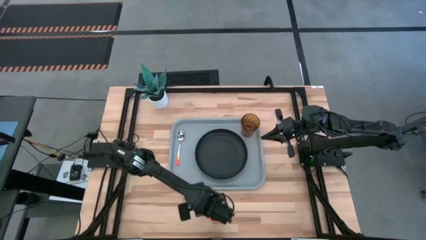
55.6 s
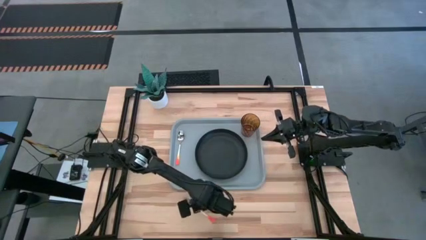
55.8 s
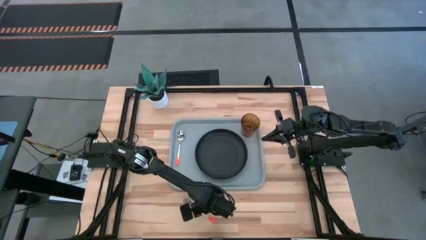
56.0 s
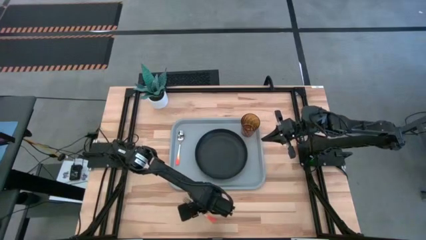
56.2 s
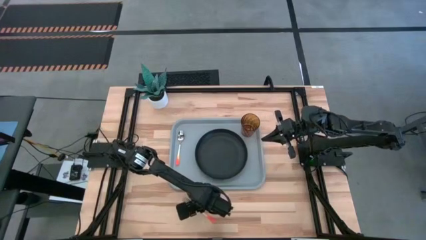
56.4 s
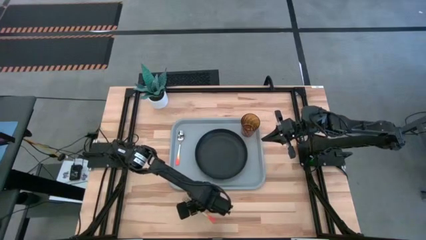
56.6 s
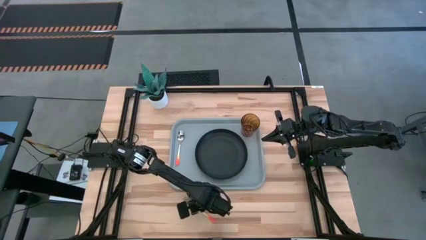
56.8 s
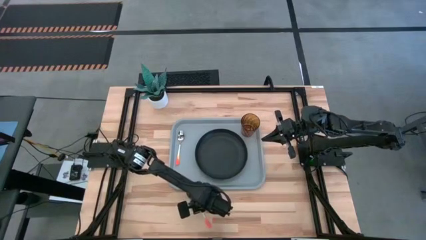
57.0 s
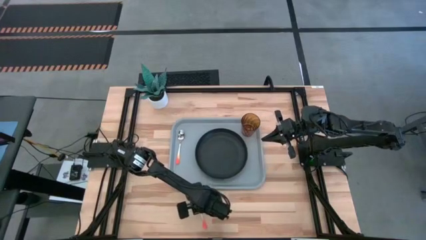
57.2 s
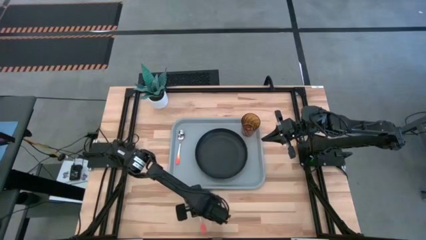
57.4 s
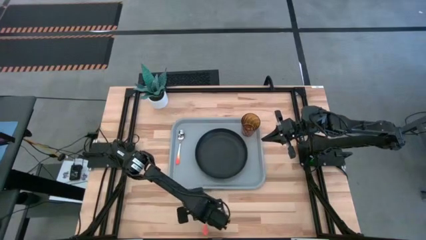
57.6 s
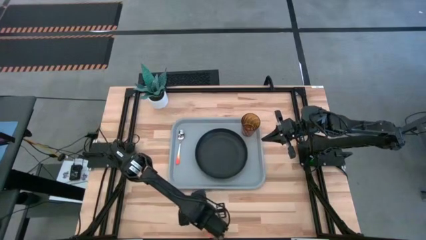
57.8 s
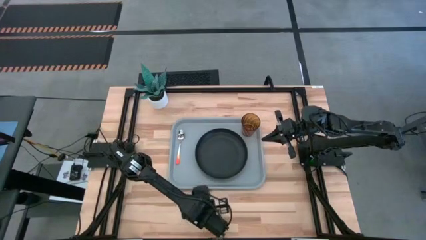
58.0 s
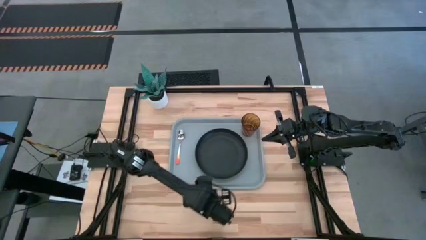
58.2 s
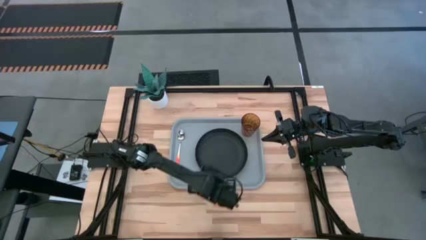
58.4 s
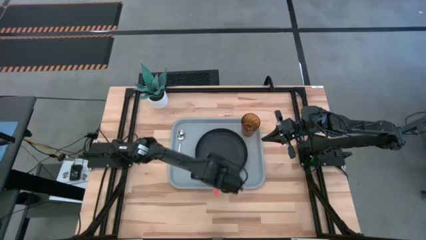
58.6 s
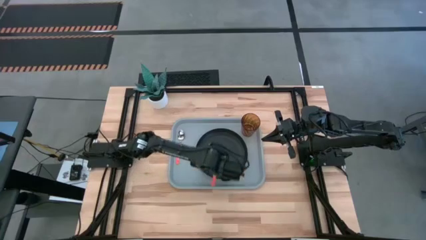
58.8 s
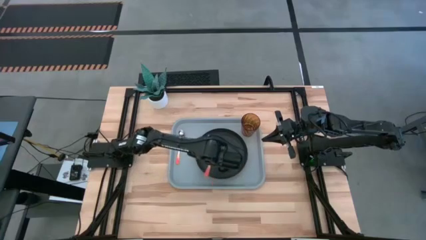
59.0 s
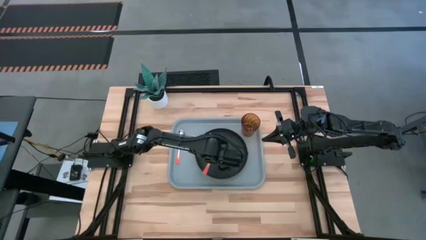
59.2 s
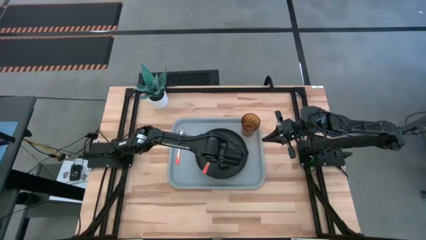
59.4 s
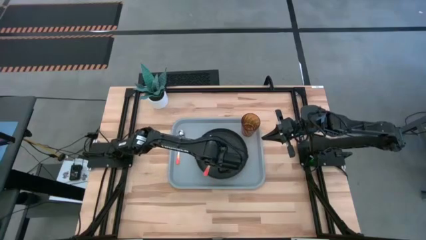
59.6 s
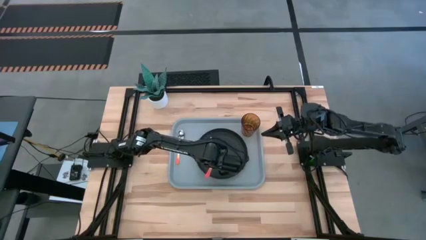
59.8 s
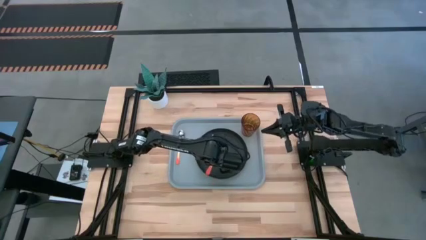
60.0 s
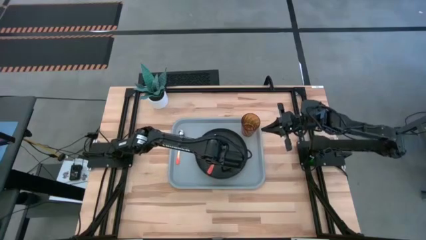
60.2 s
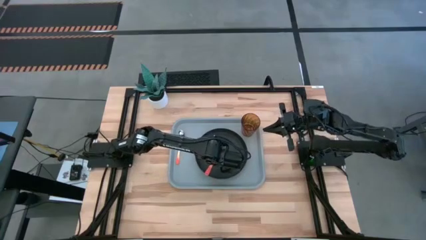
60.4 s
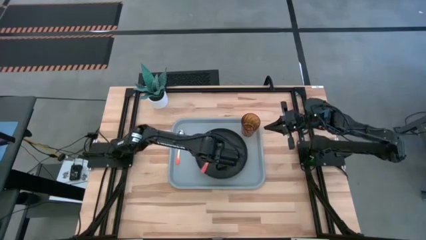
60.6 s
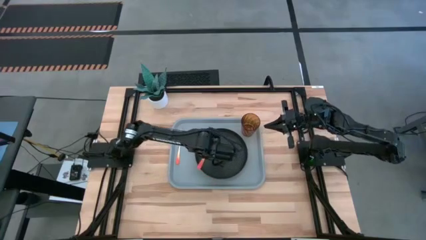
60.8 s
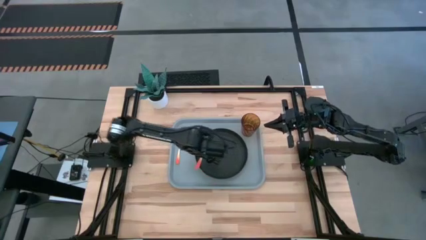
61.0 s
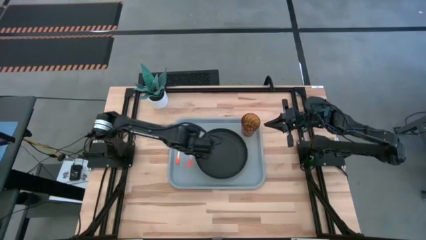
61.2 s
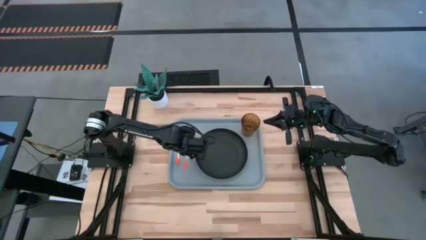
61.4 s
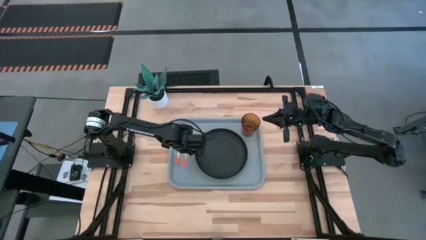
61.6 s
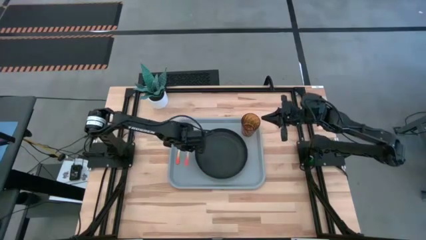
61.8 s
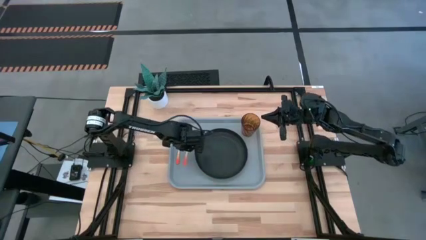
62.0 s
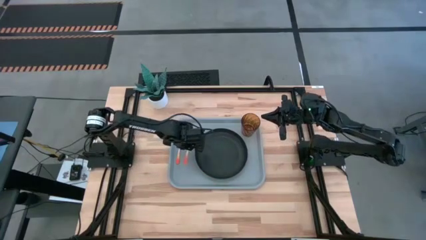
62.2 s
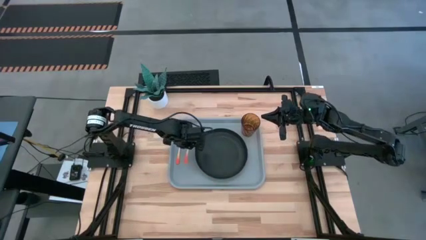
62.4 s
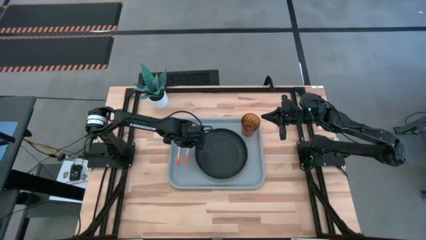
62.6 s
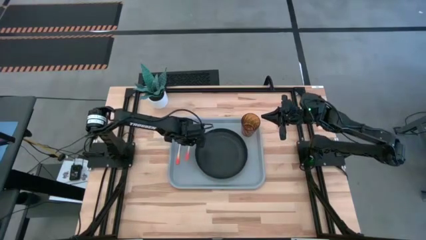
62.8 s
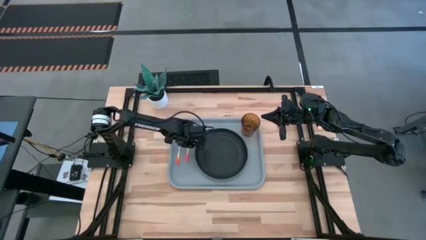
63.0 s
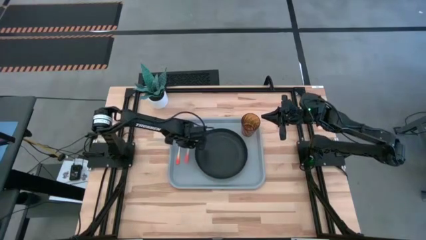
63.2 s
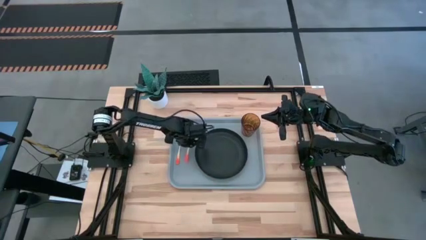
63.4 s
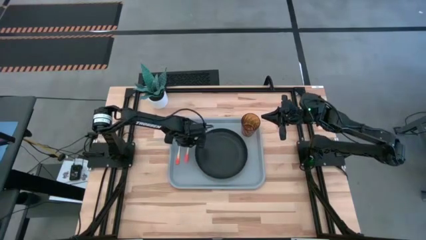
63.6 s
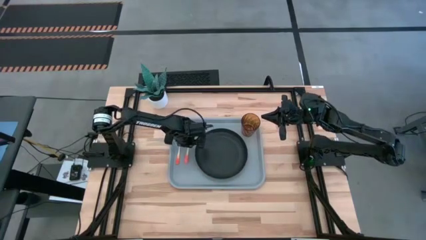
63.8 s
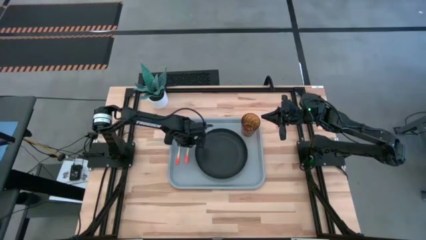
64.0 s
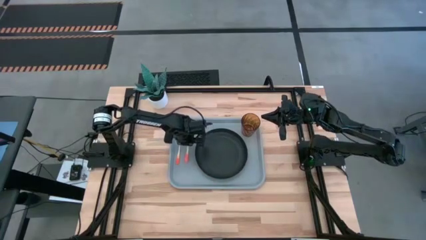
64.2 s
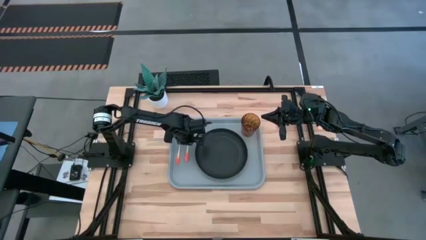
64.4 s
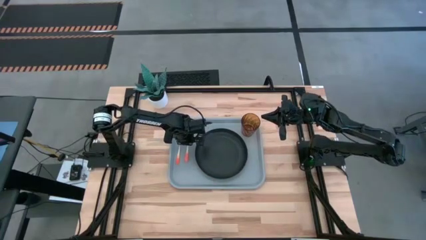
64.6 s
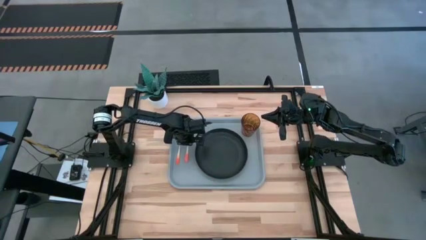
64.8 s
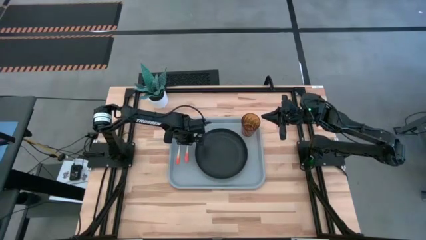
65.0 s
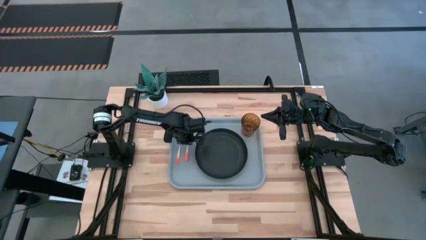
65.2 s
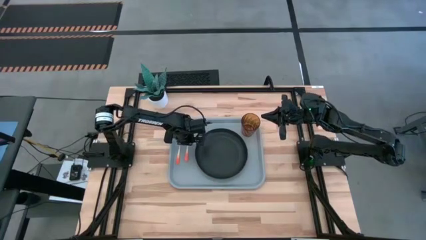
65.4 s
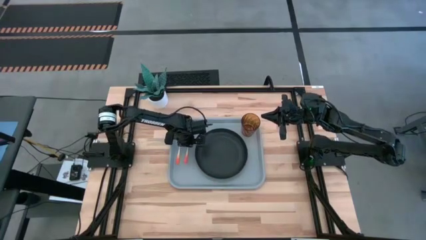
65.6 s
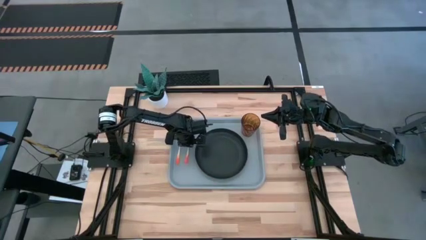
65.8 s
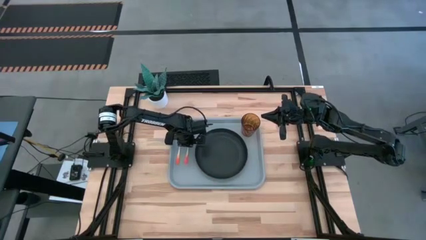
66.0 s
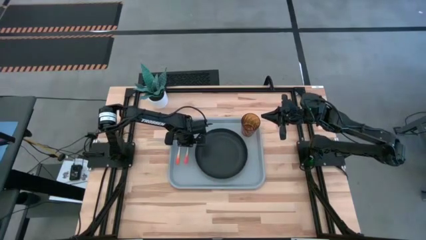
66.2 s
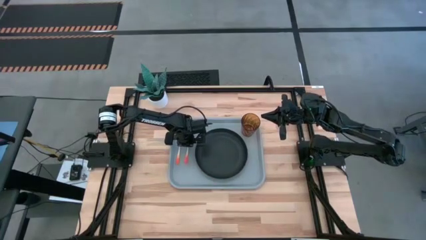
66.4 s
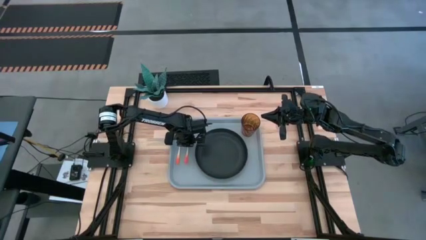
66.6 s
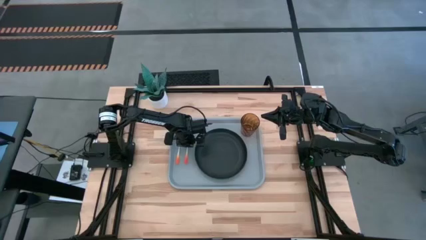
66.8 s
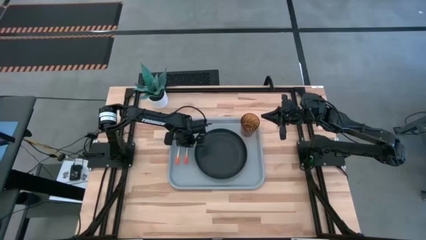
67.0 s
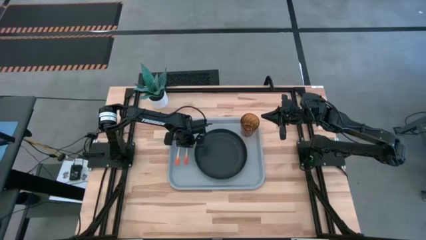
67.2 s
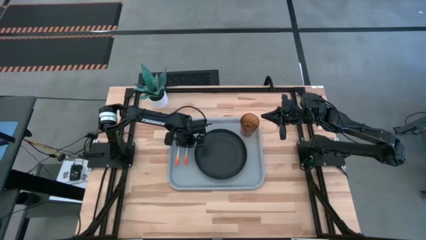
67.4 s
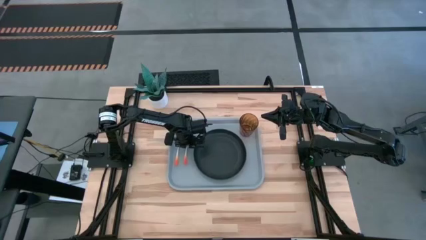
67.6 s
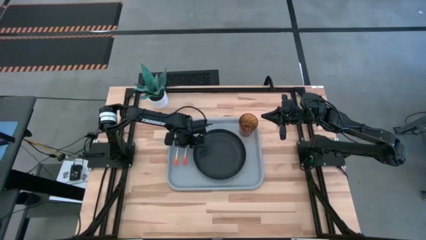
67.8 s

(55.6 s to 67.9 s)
Task: Pick and place plate/cup/fork/spoon on tray
Put the orange fork on the gray tray to the right of the orange spoon
